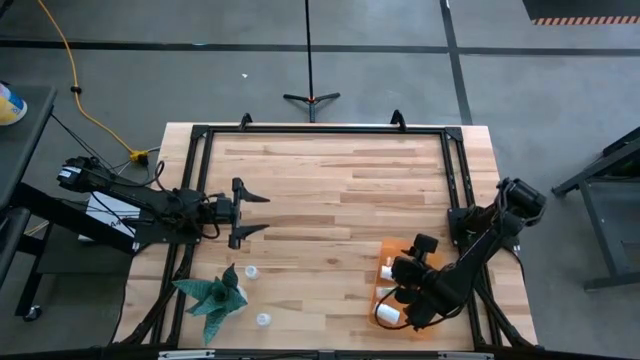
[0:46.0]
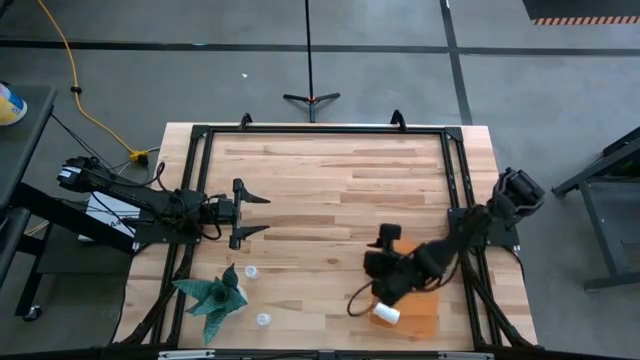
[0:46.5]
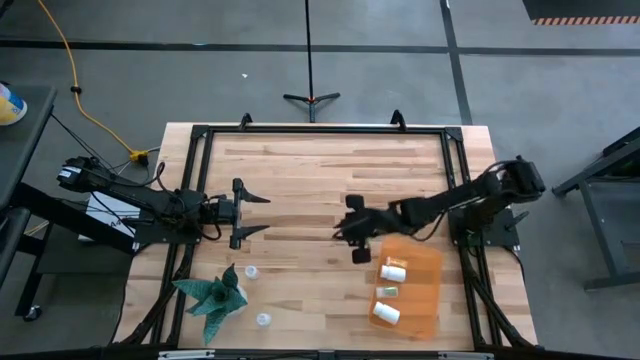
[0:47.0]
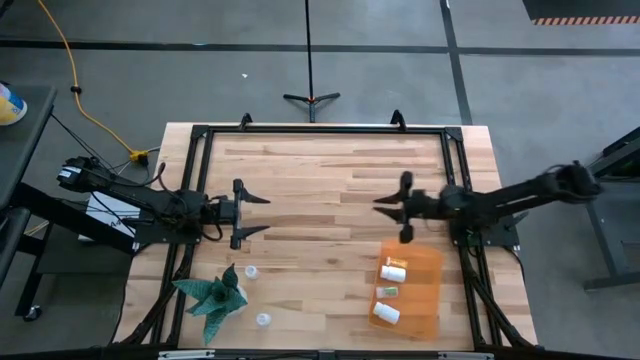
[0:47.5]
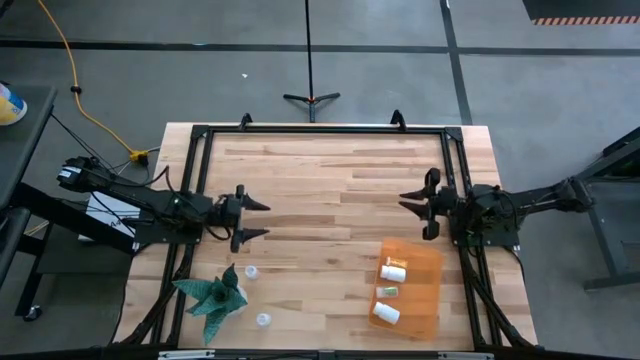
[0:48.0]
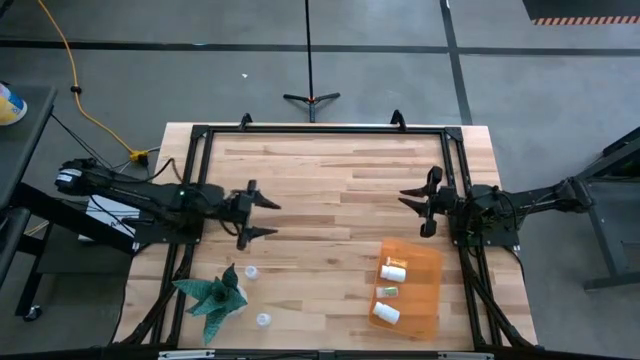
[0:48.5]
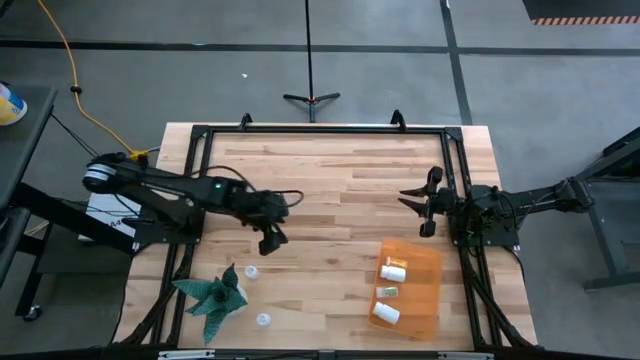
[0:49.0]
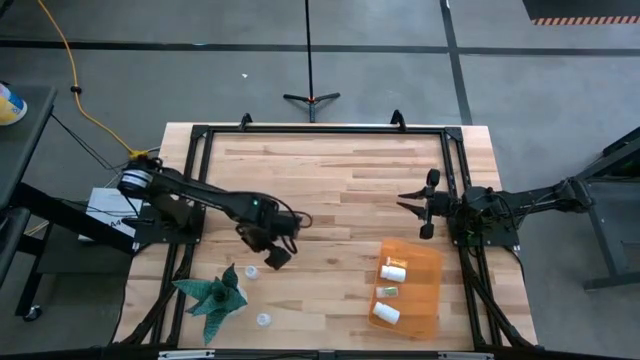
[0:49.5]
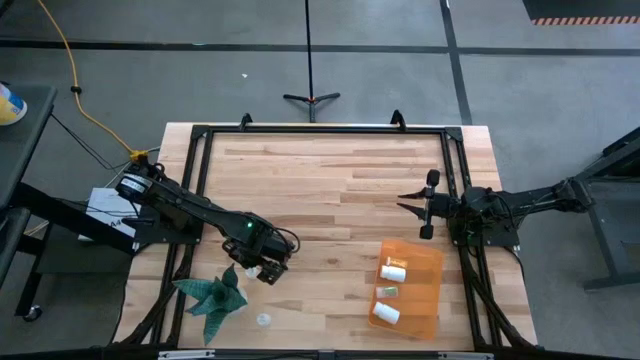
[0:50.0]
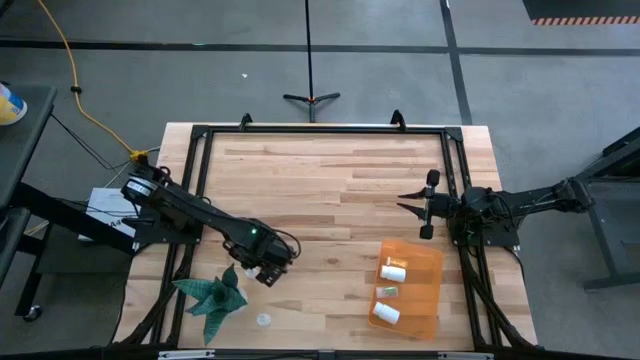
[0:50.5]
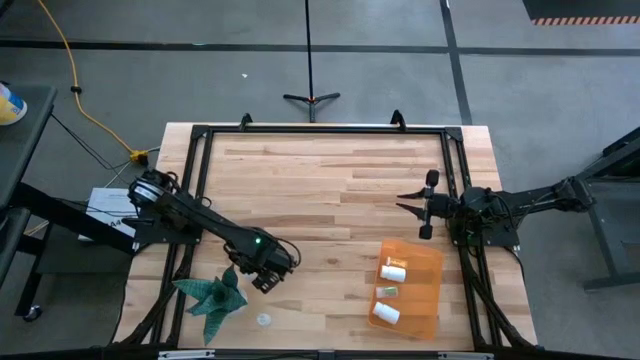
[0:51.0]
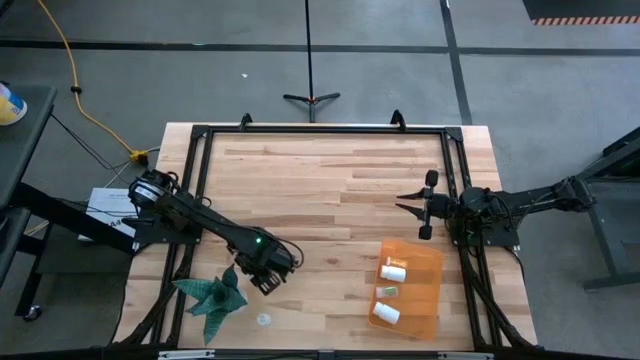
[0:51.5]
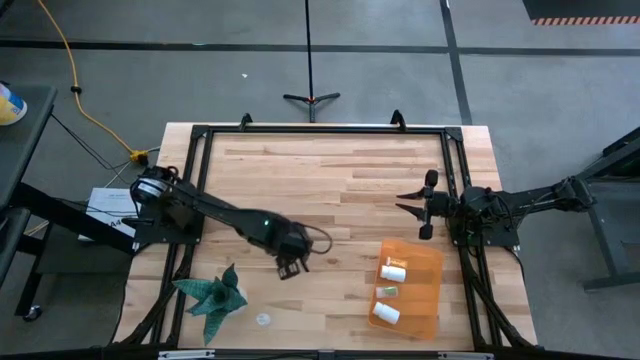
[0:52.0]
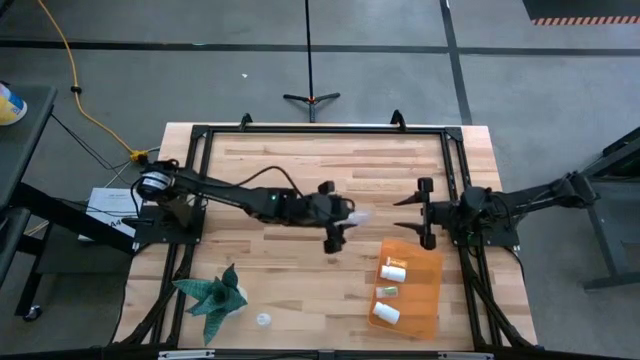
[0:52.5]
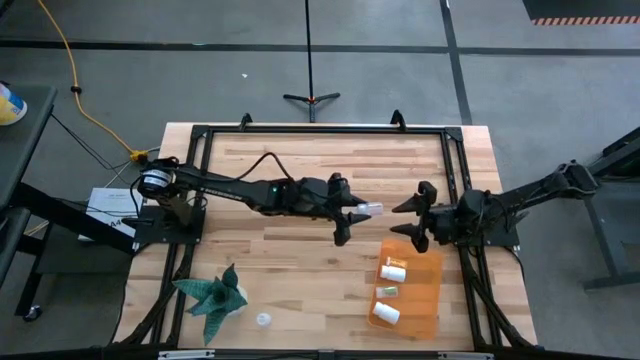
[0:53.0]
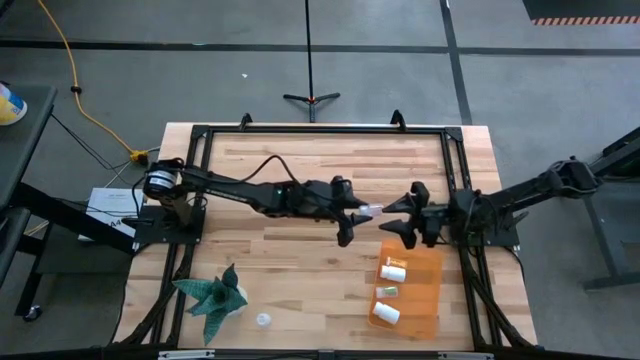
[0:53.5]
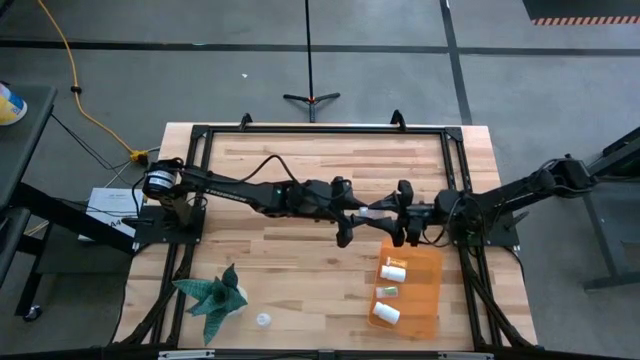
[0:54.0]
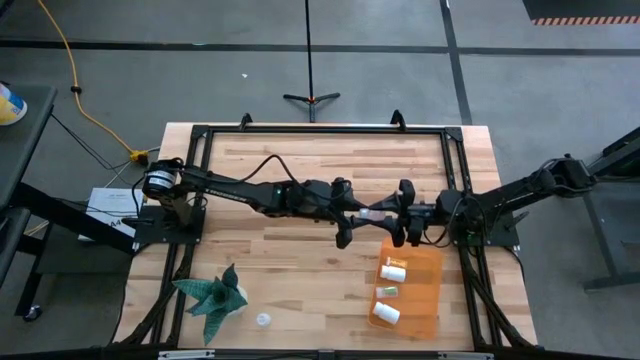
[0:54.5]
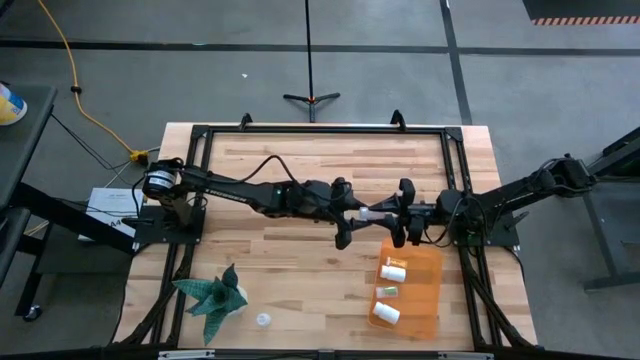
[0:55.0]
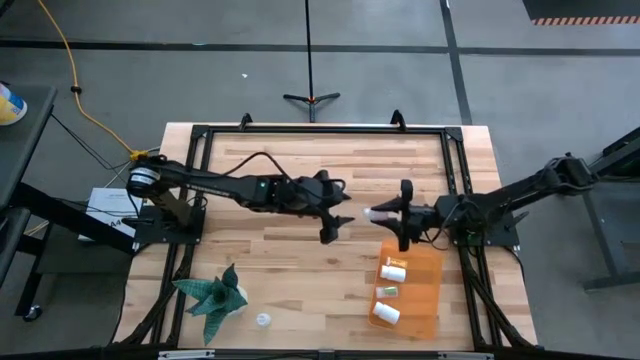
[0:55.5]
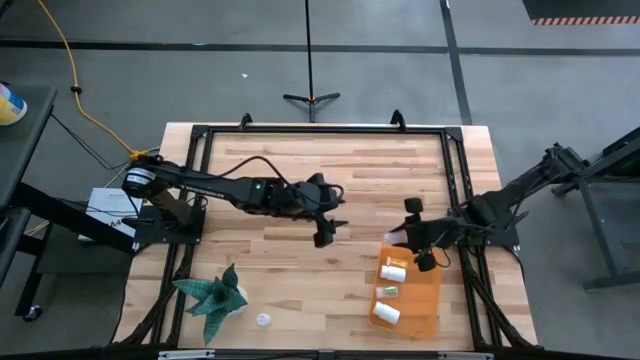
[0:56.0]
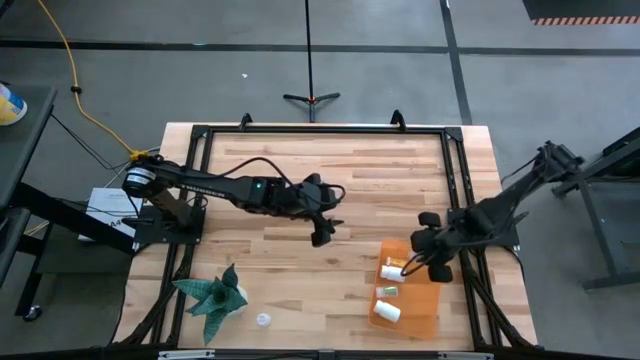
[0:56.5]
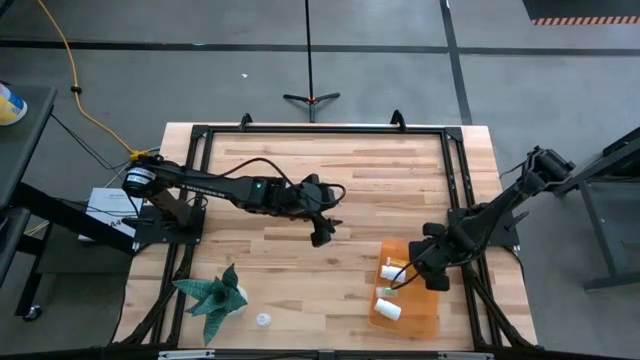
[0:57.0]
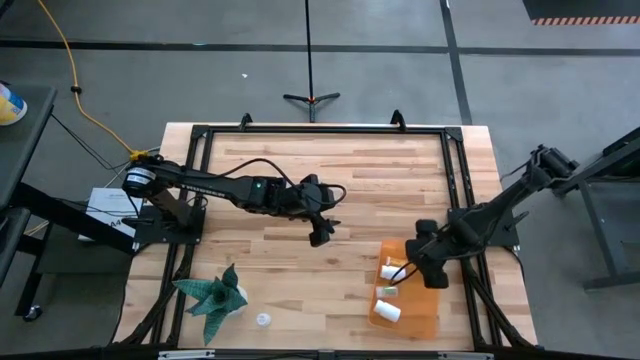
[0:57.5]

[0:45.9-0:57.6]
Task: Pick and place pill bottles into a basket
Put the top transparent medicine bottle into the orange bin

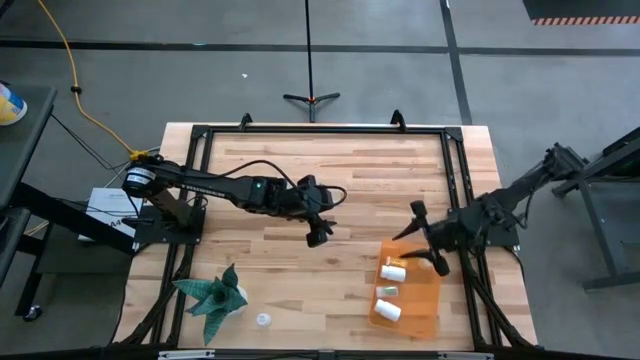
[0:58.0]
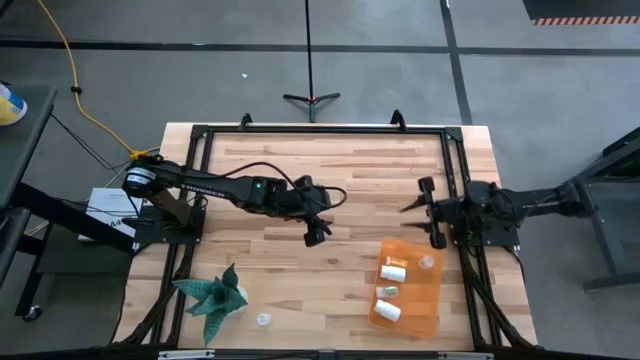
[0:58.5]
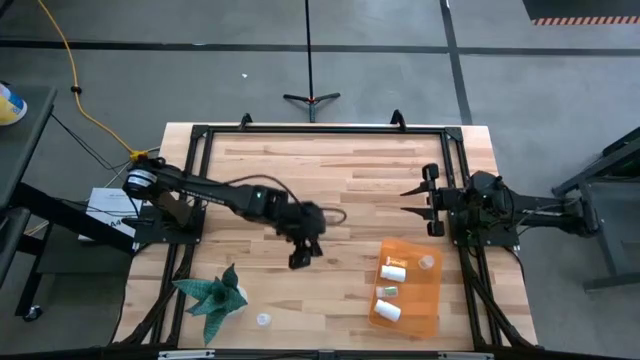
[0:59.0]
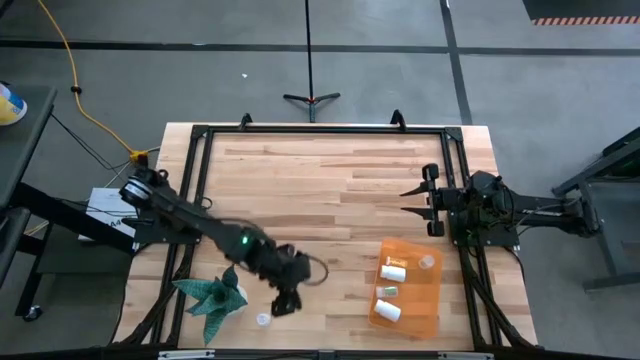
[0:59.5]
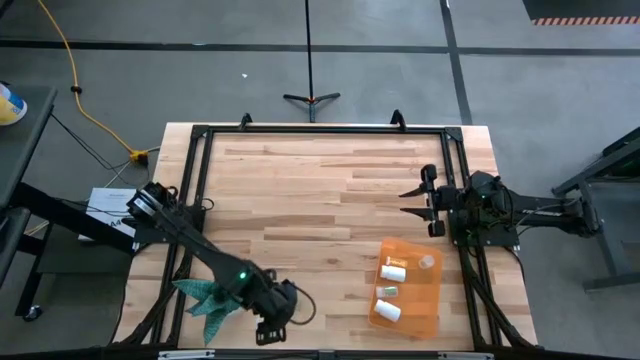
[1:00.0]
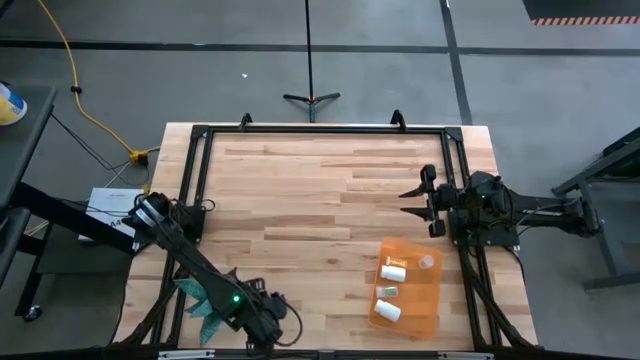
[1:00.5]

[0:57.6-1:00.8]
Put the transparent medicine bottle into the orange bin

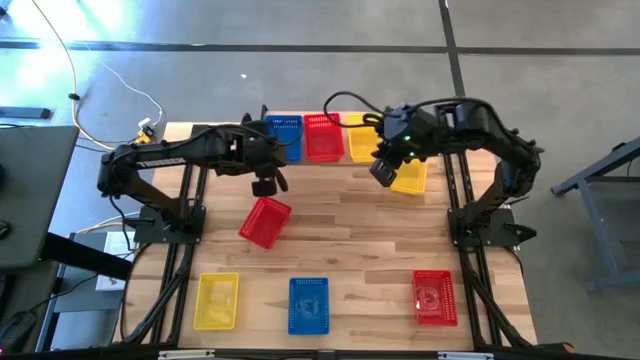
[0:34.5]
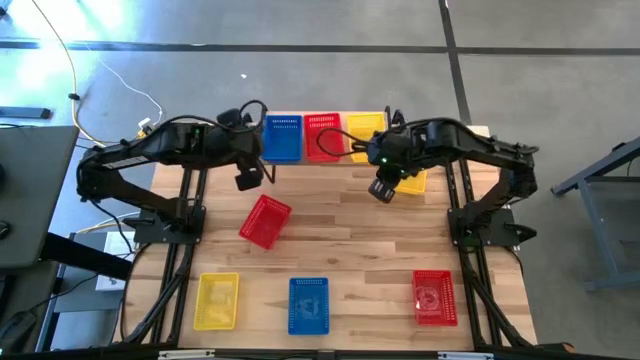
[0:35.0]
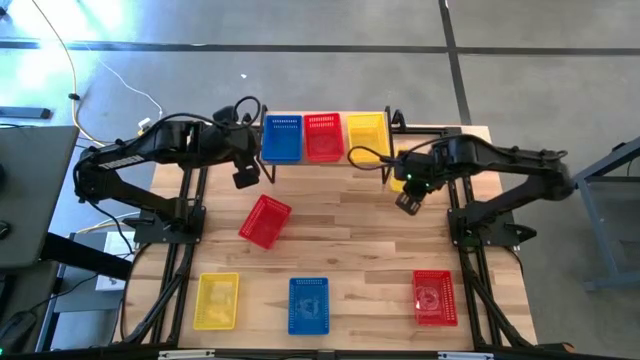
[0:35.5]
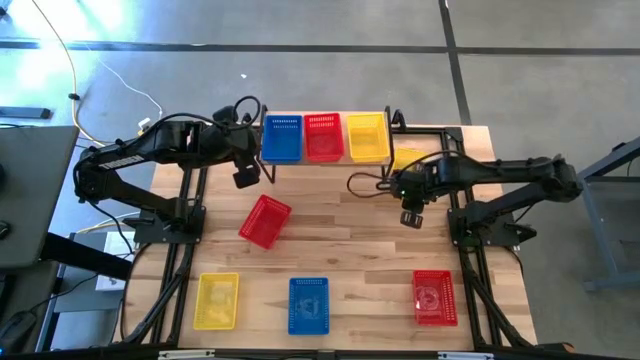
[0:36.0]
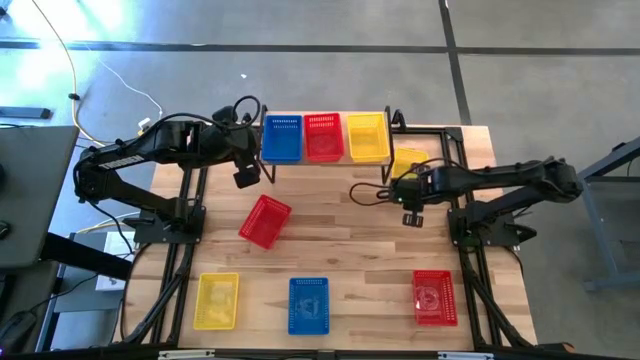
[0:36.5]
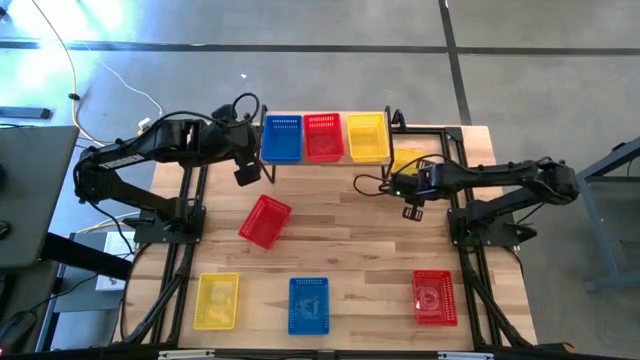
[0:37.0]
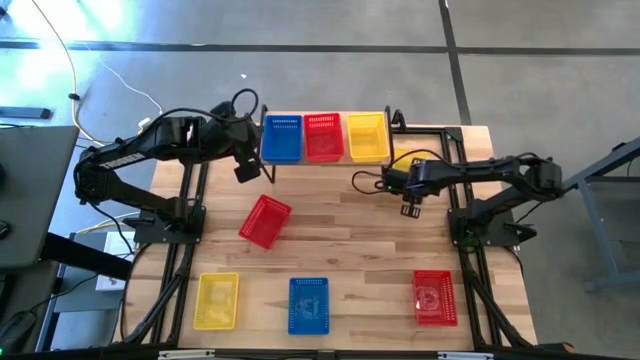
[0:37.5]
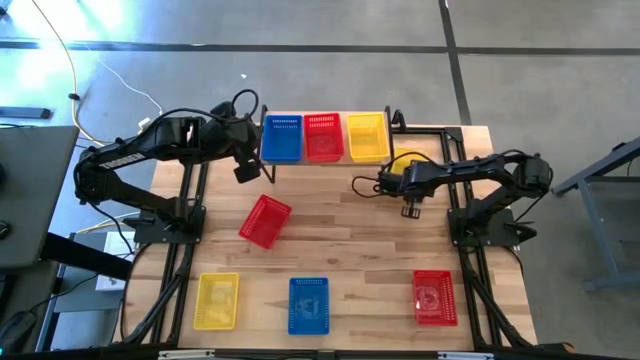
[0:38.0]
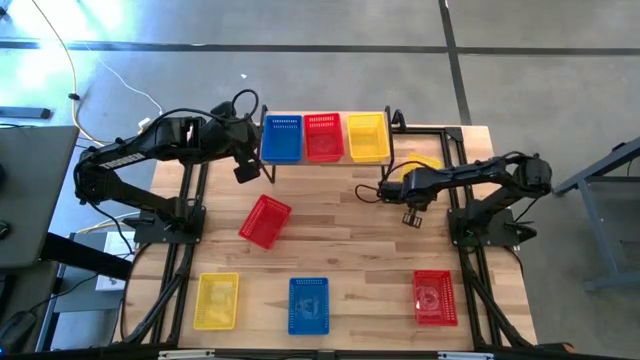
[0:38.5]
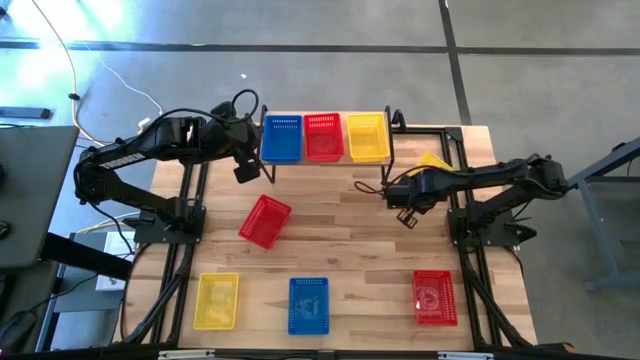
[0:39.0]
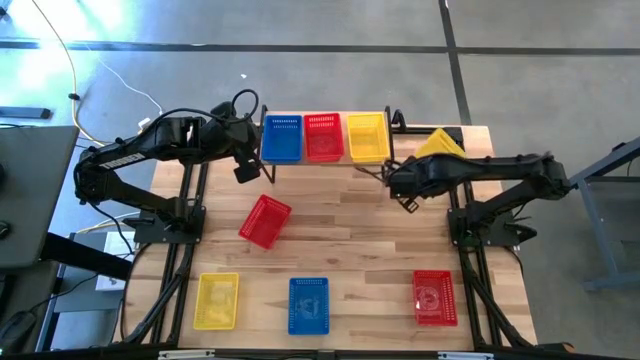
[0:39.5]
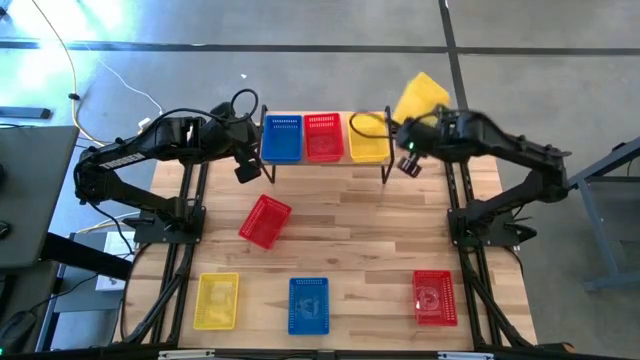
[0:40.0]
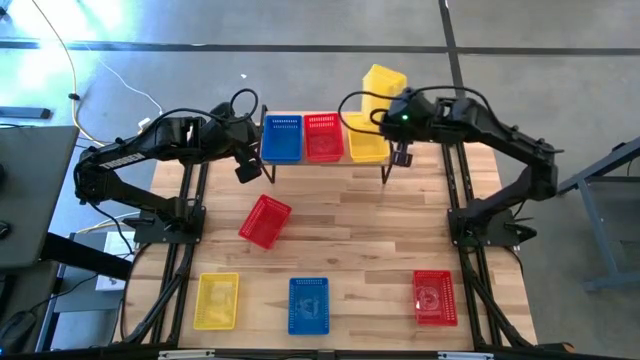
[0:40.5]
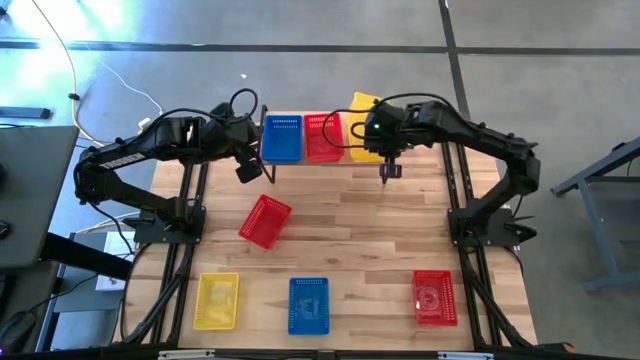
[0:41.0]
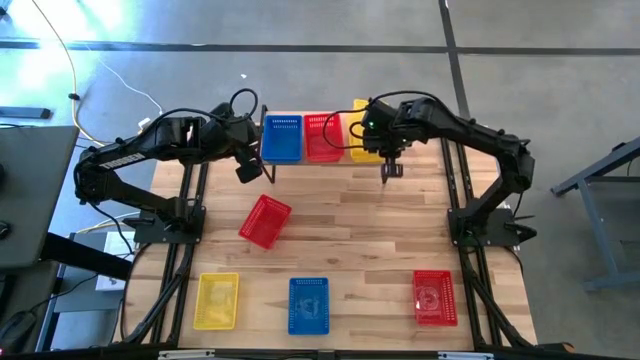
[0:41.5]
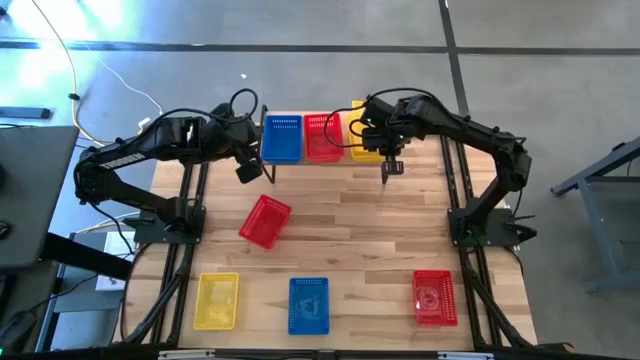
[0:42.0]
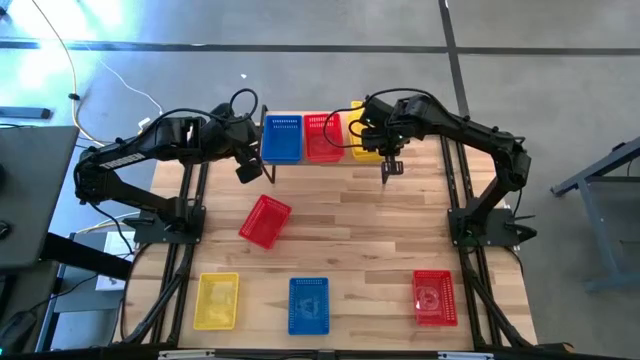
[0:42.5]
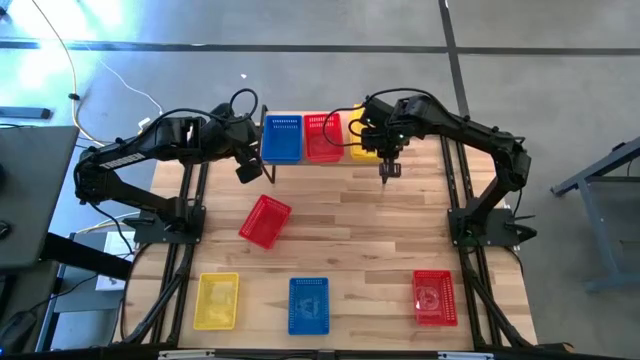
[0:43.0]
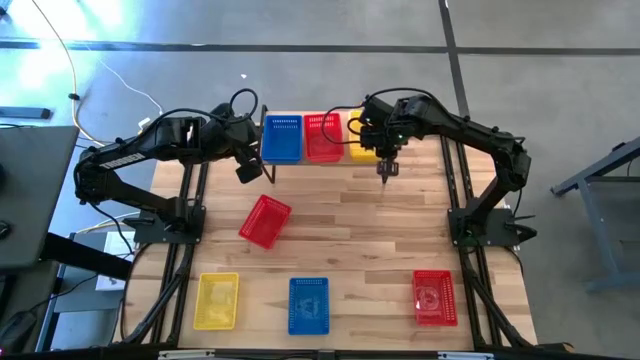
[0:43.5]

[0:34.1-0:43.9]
Task: Stack baskets on shelf by color
Stack the top yellow basket on top of the yellow basket on the shelf
